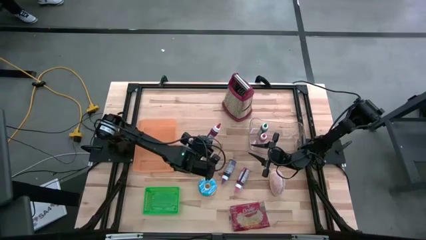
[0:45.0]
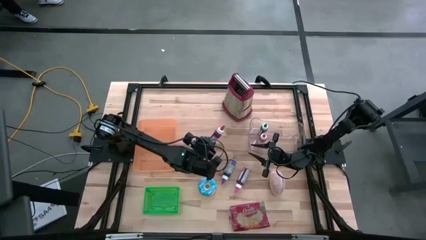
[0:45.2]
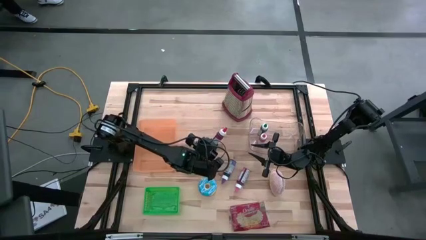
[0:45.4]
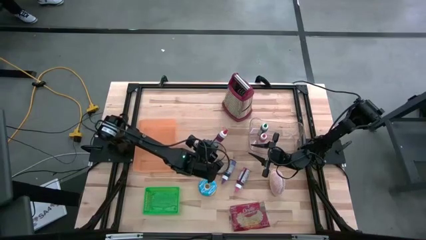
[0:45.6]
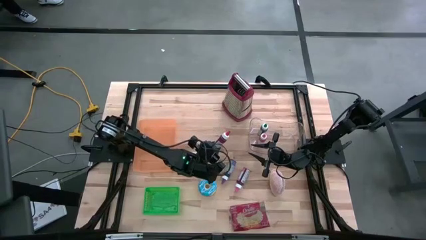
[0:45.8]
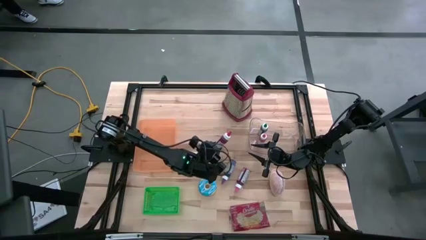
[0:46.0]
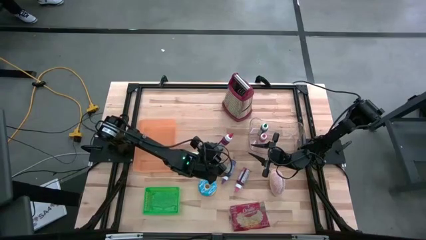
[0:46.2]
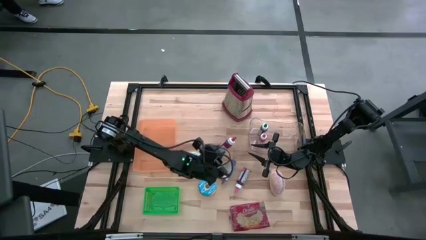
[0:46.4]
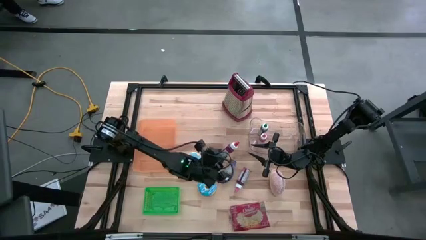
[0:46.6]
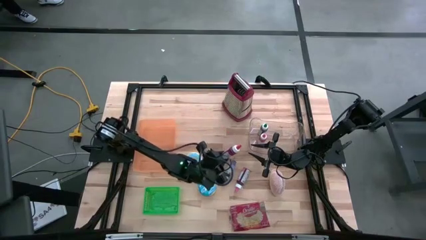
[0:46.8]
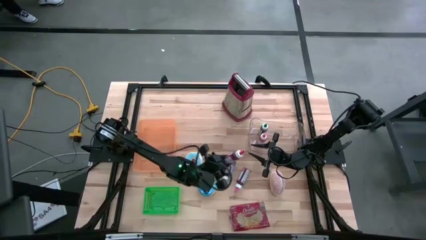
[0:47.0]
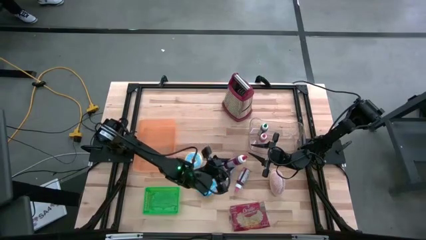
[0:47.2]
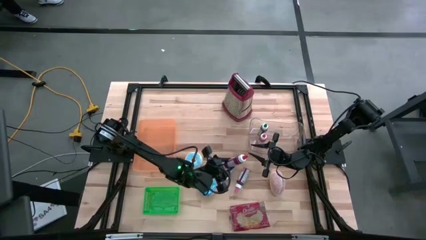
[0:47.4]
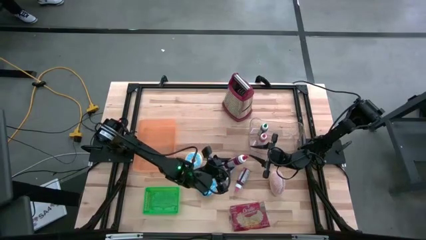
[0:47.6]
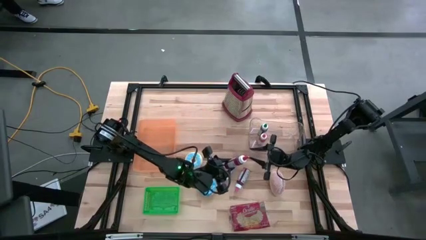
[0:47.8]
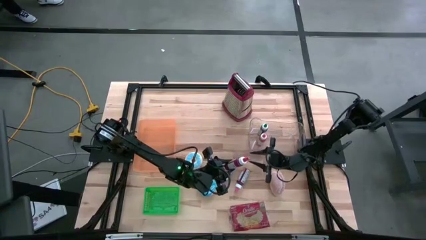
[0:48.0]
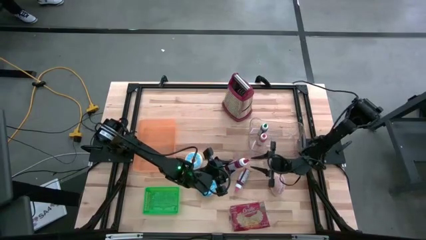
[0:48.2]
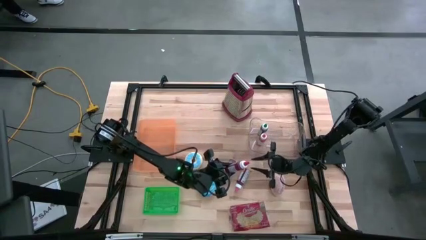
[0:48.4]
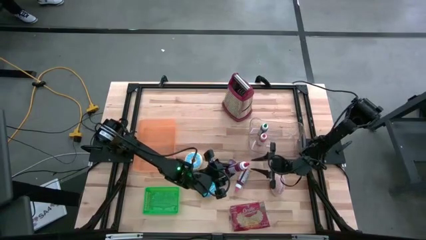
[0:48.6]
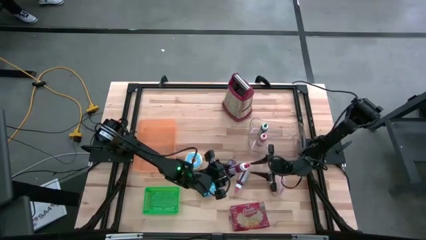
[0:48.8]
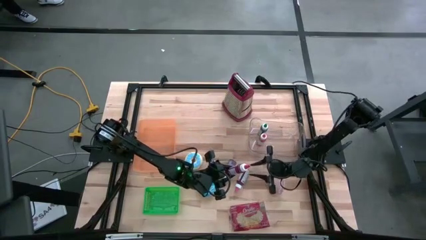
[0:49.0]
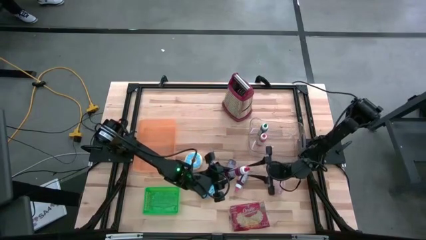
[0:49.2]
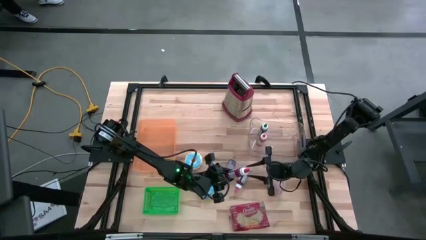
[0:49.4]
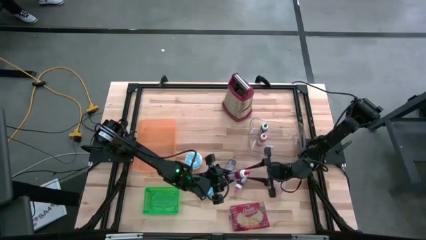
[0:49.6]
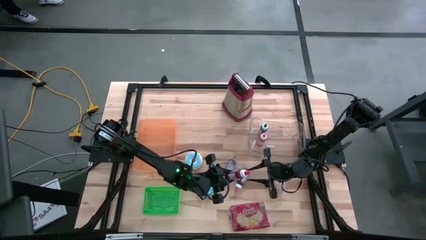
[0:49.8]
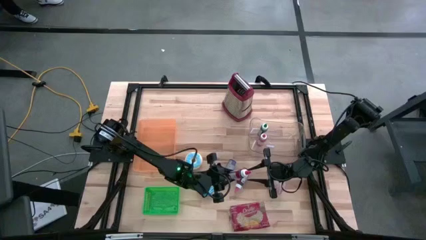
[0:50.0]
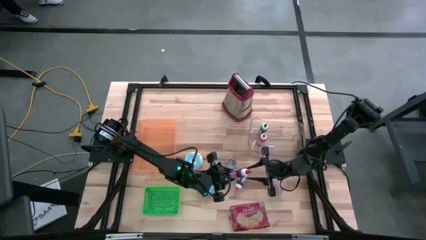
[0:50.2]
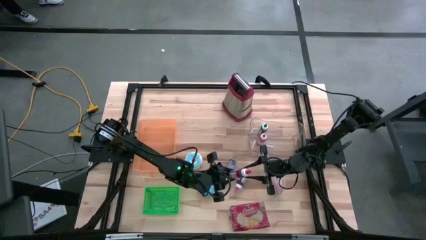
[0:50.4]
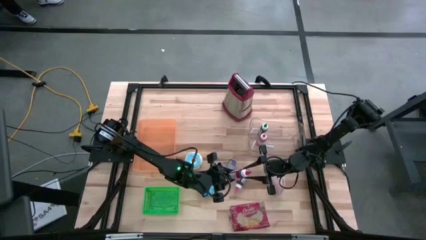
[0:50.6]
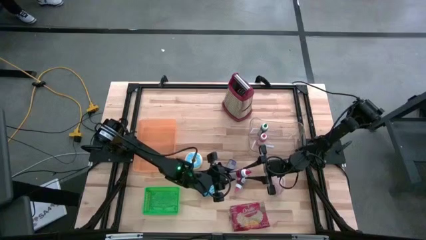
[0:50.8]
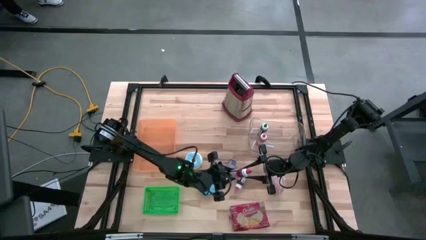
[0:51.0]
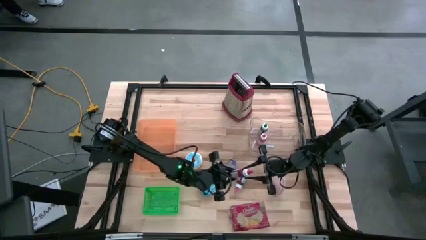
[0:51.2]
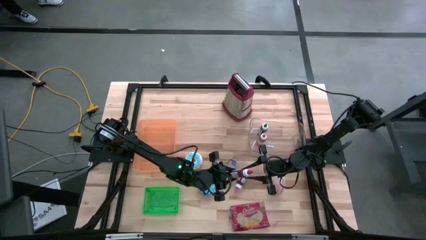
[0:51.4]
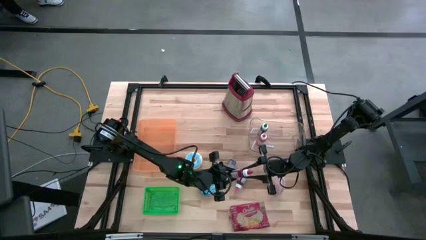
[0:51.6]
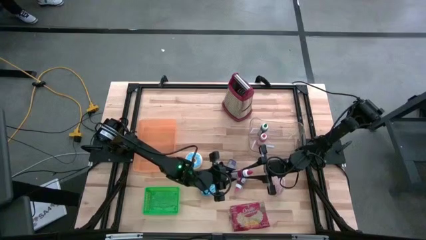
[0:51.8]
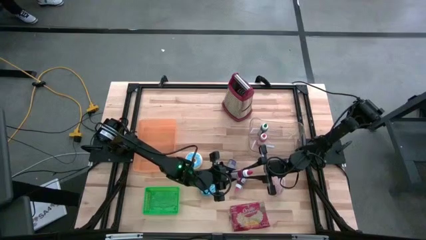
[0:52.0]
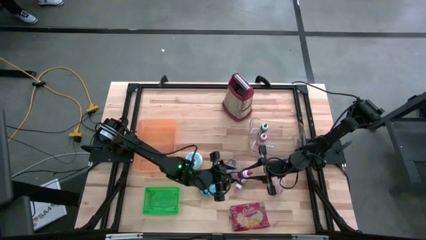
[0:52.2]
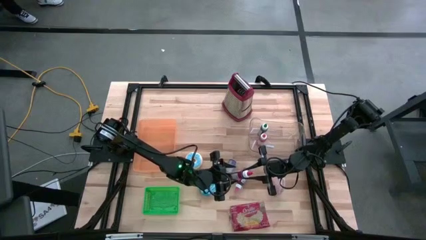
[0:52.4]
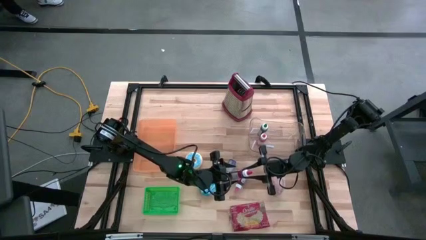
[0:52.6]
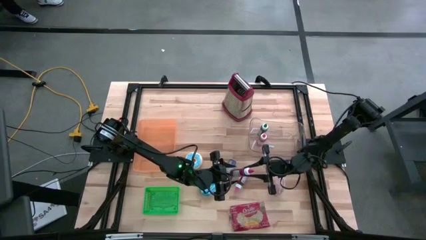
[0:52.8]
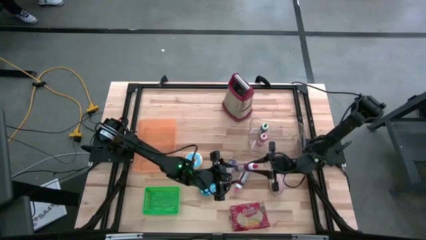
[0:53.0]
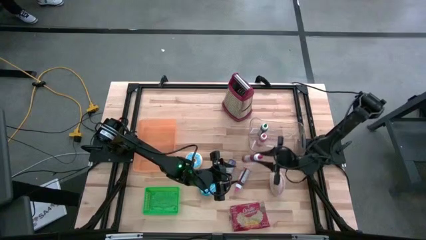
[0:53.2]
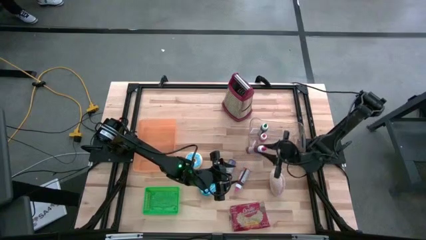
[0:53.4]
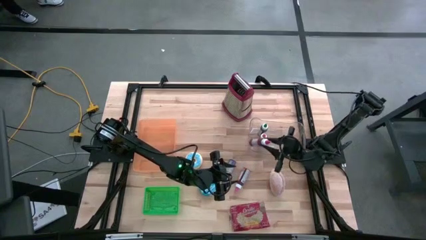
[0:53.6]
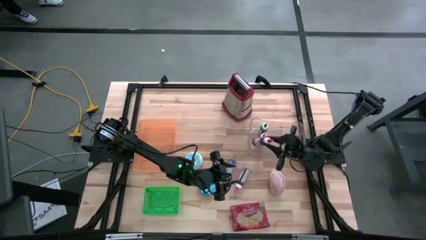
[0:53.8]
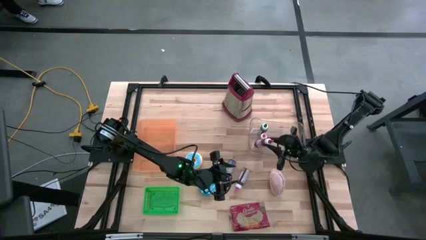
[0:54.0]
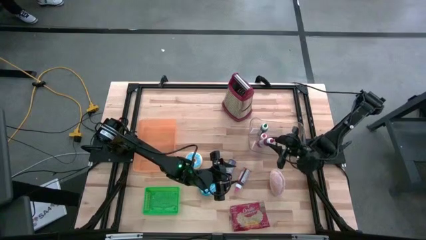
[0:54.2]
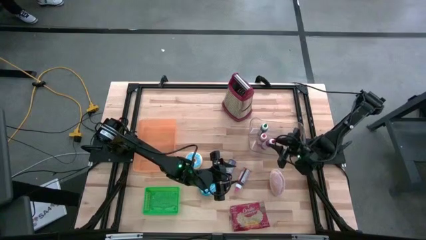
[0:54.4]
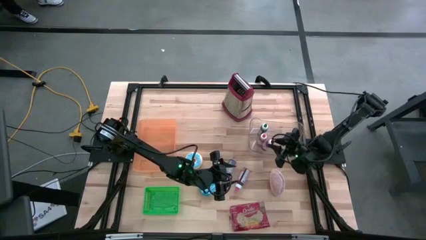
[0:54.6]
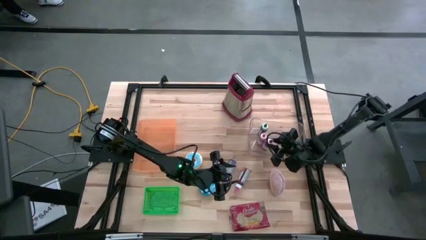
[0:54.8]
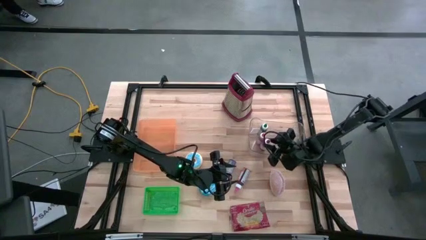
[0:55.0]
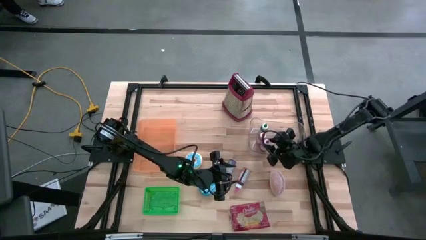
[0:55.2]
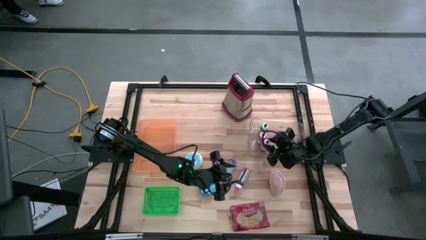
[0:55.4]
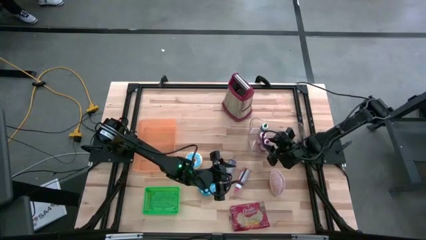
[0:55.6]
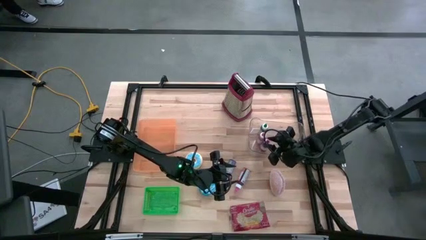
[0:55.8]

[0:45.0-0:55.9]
Put the red food coloring into the transparent bin

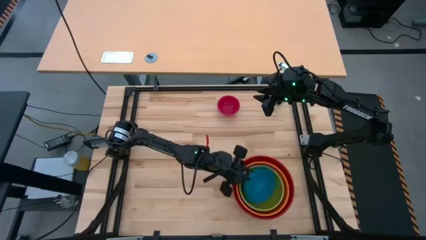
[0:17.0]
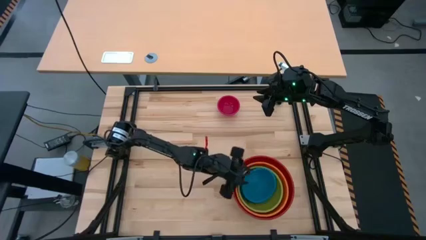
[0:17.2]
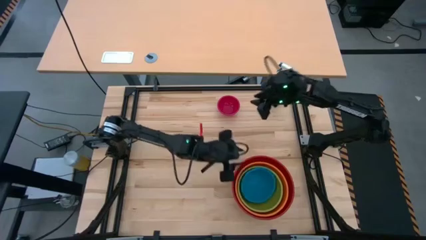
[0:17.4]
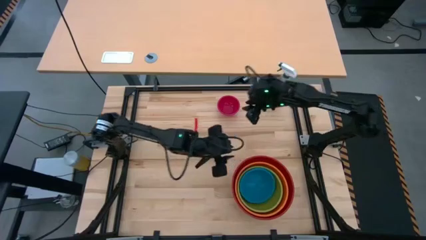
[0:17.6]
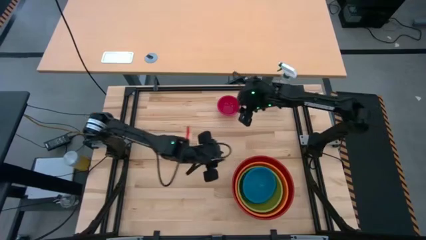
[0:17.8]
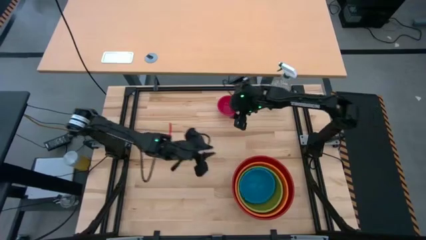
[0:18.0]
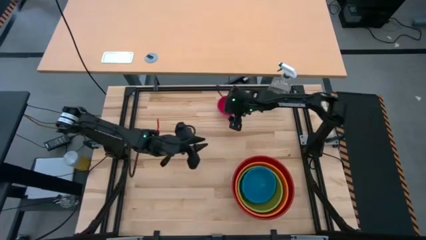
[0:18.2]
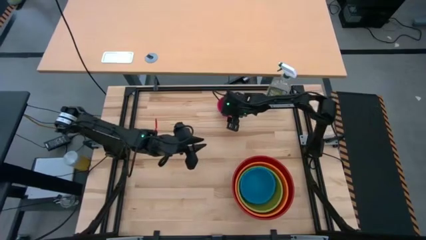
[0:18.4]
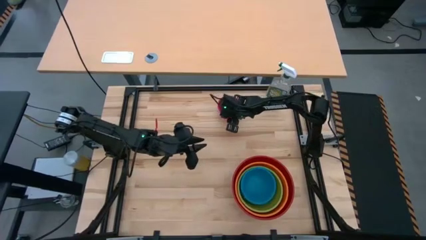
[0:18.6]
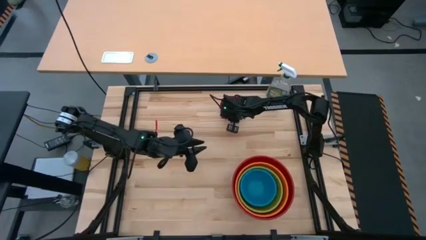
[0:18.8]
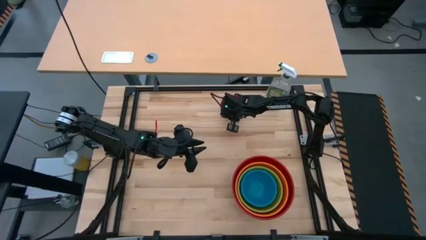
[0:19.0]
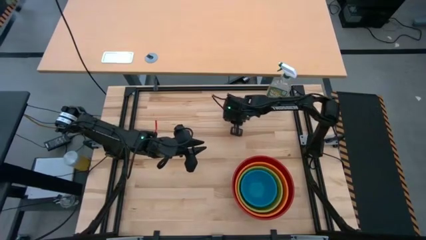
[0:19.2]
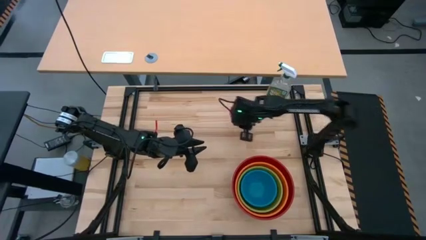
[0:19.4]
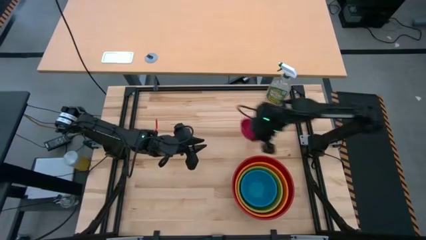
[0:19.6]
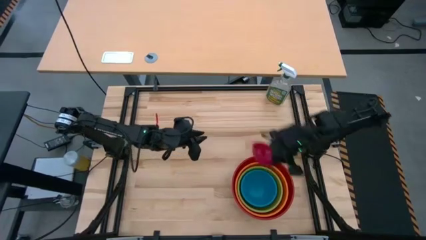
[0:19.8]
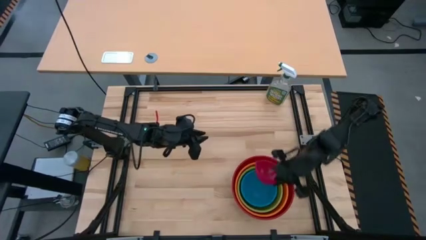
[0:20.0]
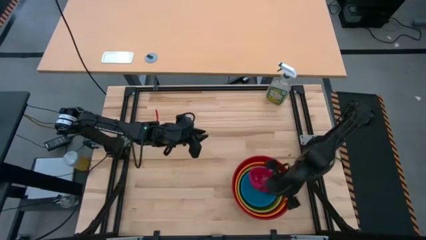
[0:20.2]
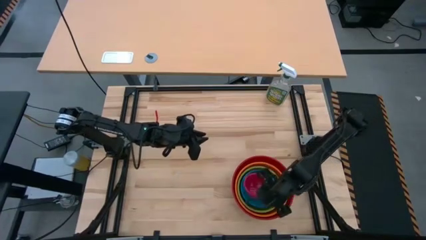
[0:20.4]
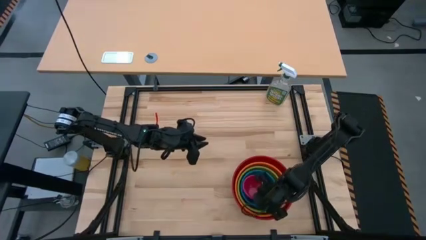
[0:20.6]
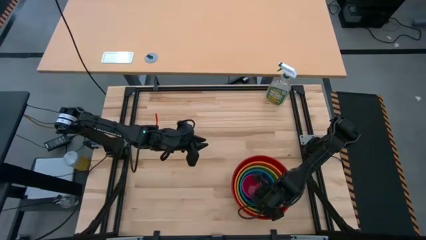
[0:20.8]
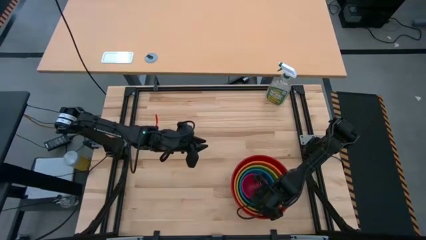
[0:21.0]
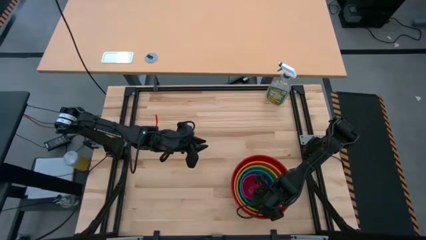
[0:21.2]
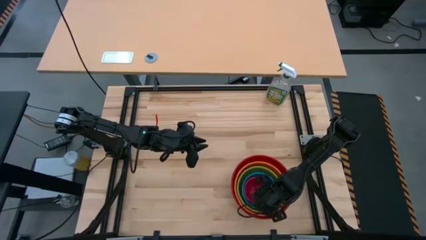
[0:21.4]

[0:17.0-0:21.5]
Stack the pink bowl on top of the blue bowl
